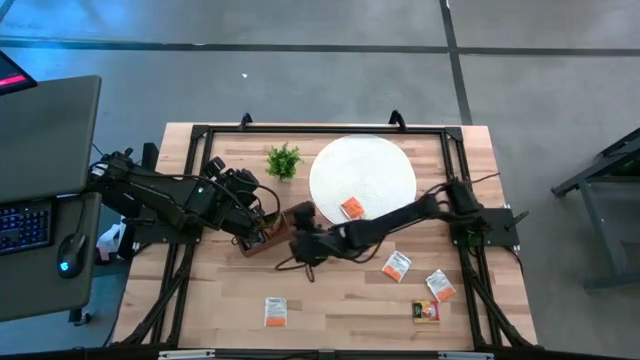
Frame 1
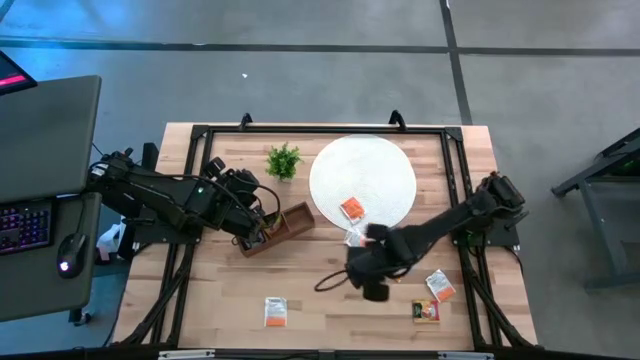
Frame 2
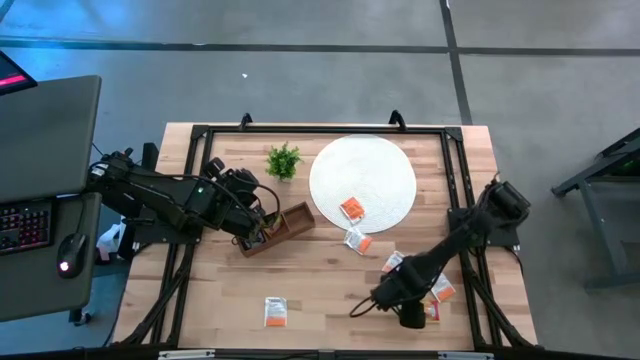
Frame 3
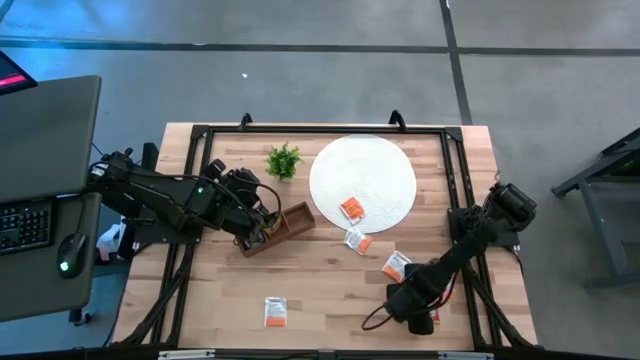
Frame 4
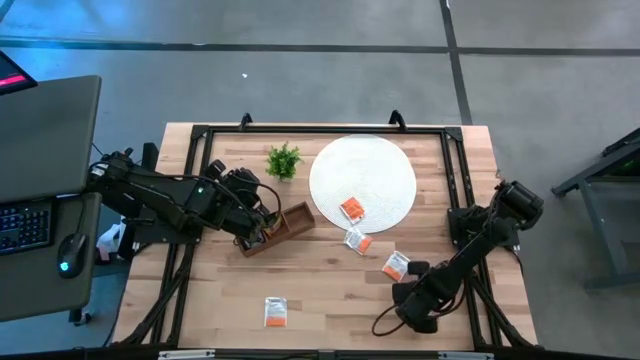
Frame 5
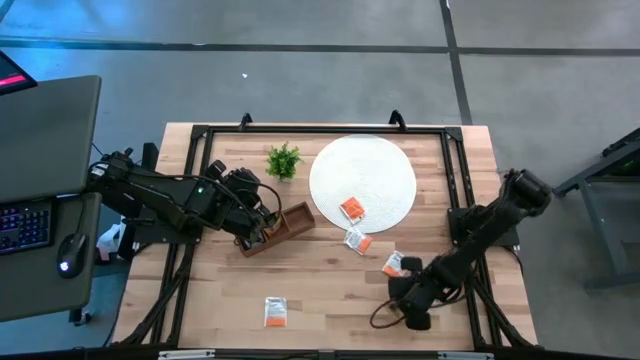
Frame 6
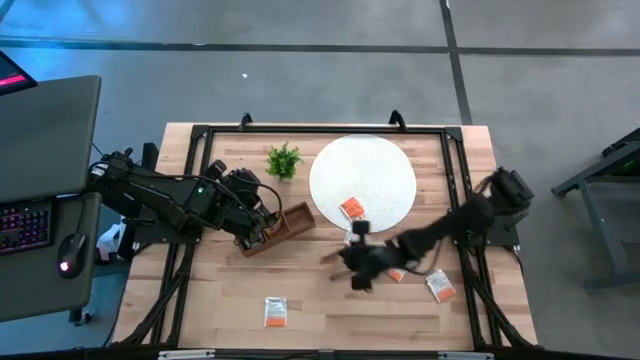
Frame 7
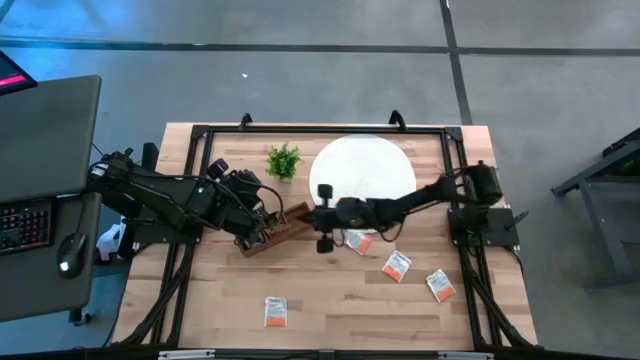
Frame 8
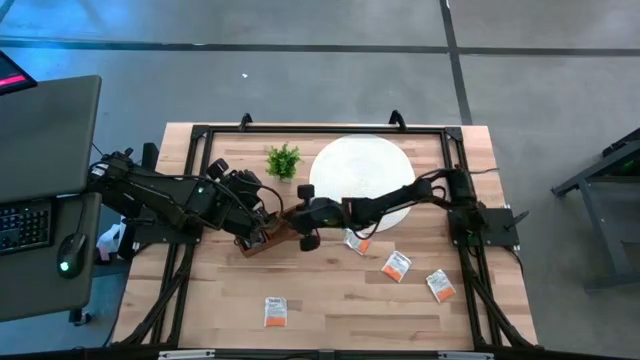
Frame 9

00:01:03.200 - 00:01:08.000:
Task: Pick & Place Tea
Put the yellow tea bag into the middle section of the wooden organizer

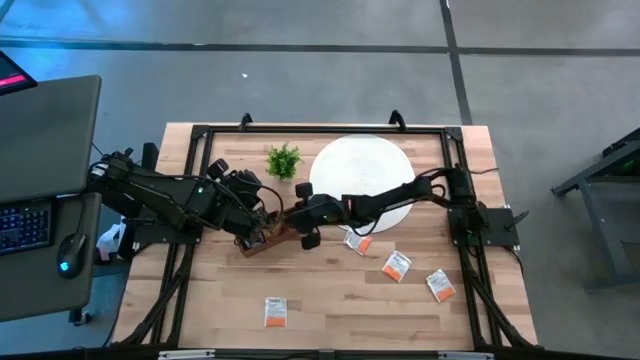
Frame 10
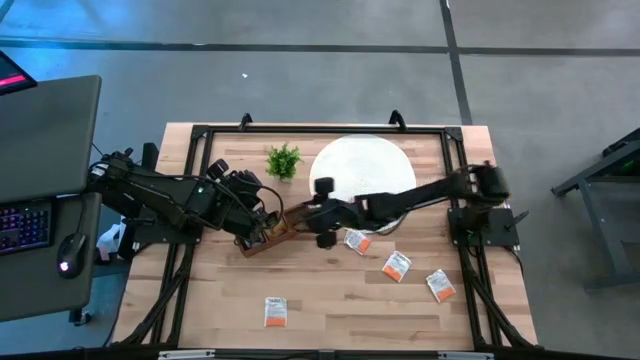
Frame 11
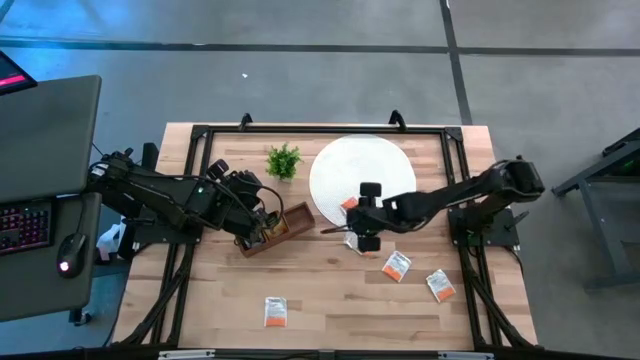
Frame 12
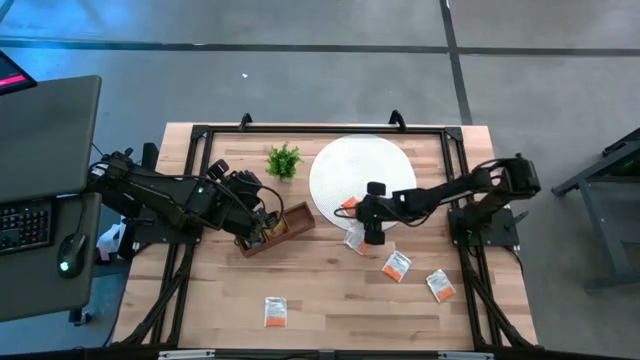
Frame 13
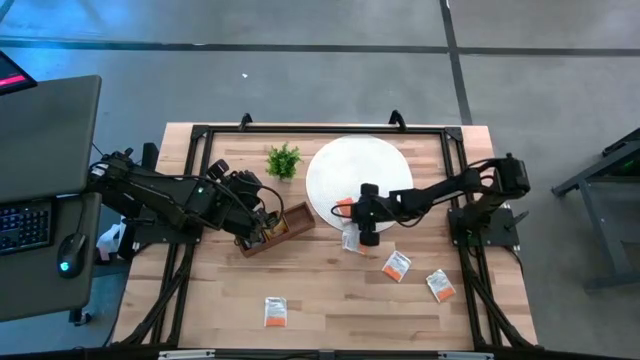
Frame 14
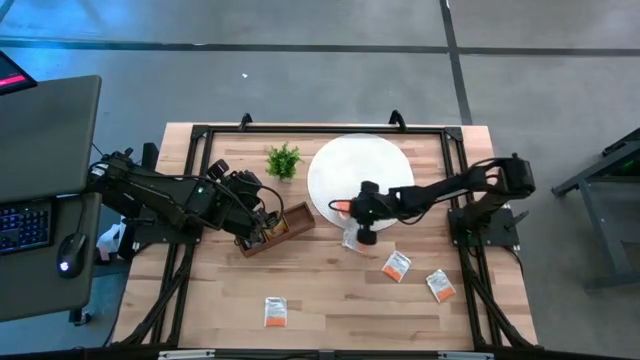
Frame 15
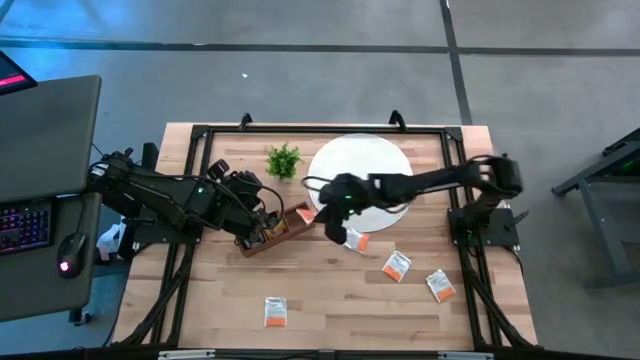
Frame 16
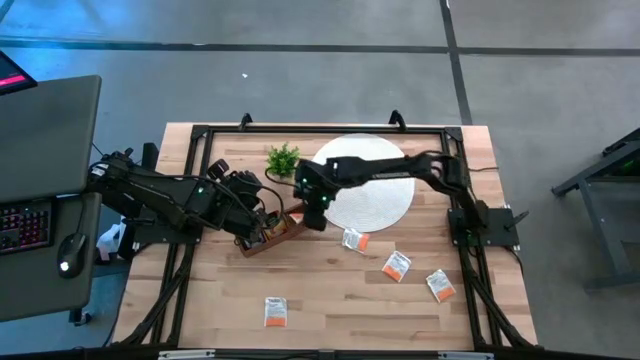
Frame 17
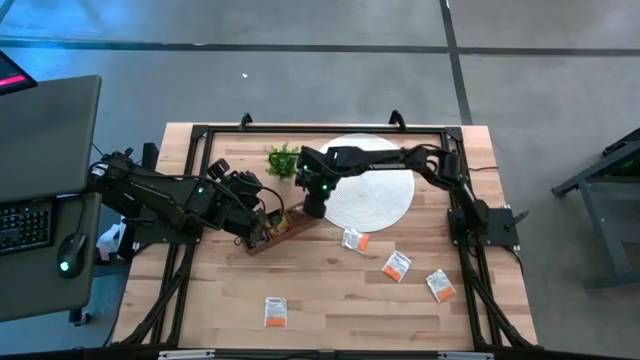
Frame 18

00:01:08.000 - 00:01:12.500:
Put the orange tea bag into the right section of the wooden organizer

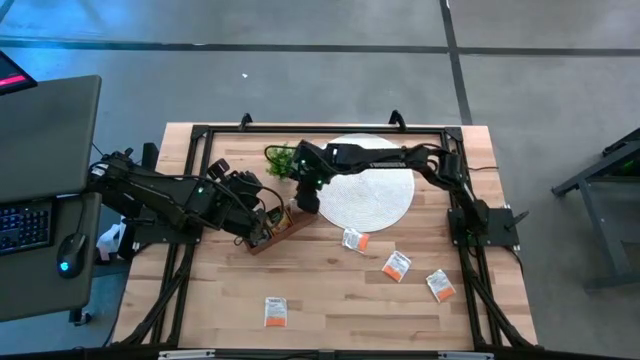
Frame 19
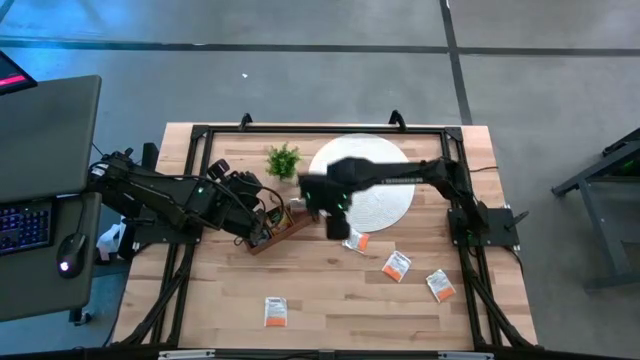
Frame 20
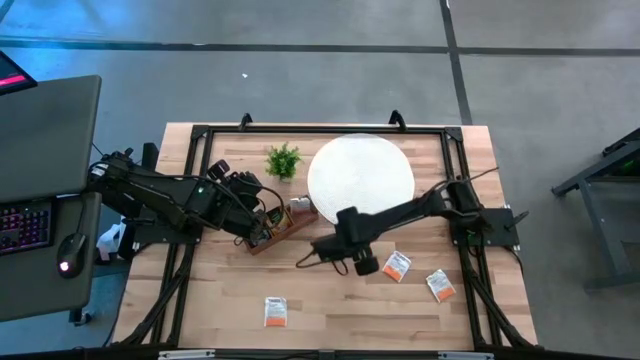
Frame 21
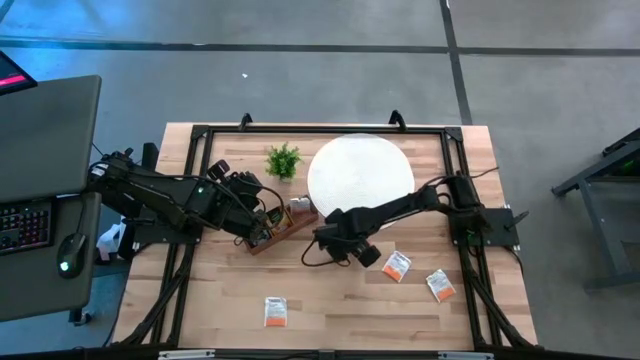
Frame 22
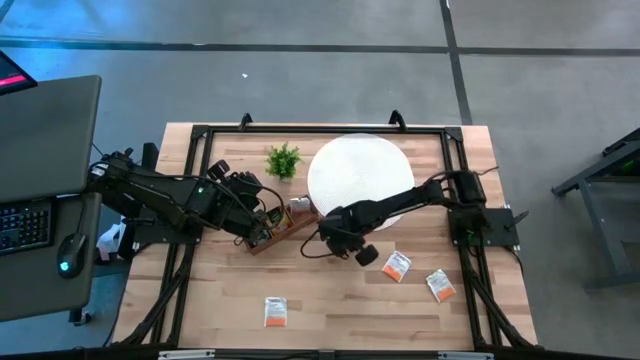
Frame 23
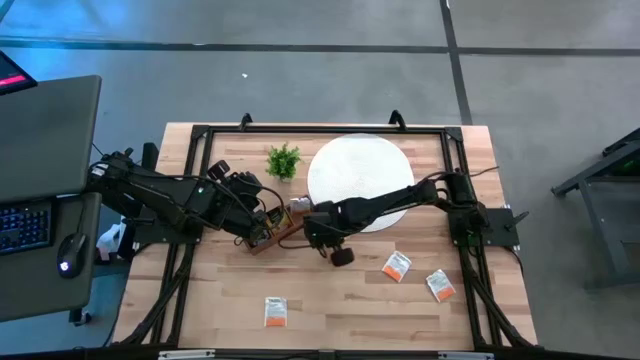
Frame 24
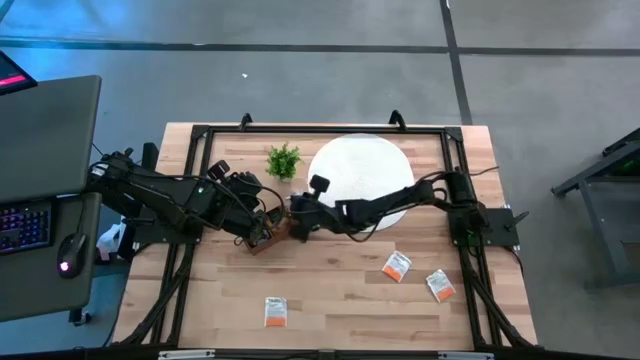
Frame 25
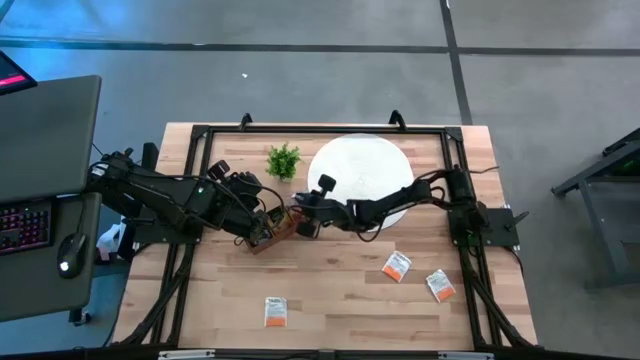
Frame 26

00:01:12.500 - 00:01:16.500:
Put the orange tea bag into the right section of the wooden organizer

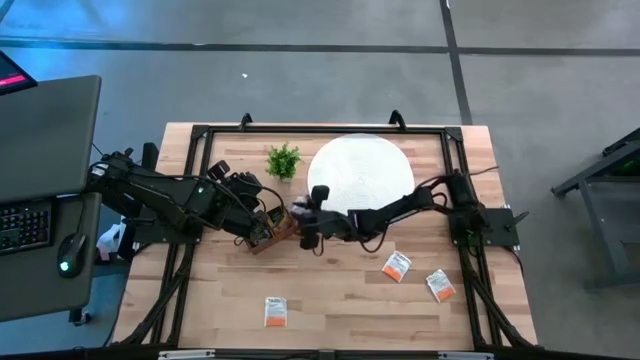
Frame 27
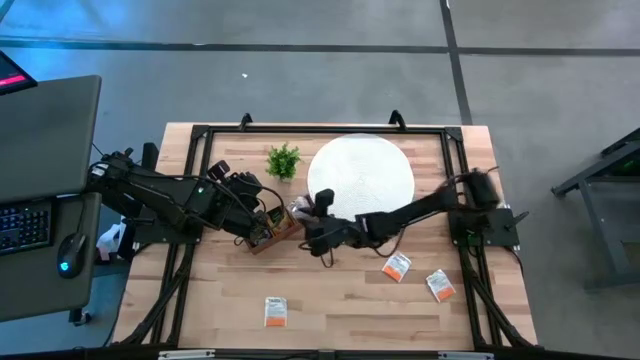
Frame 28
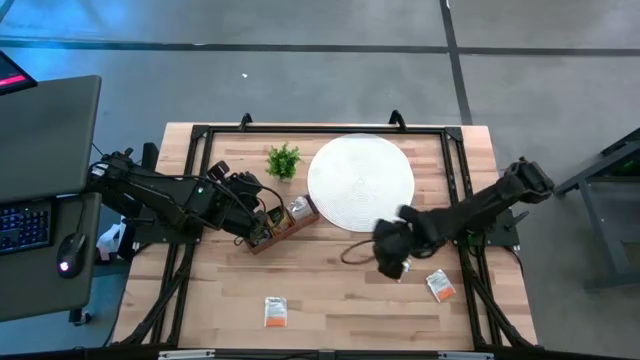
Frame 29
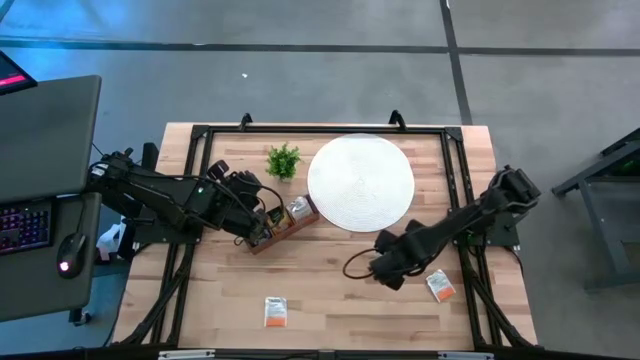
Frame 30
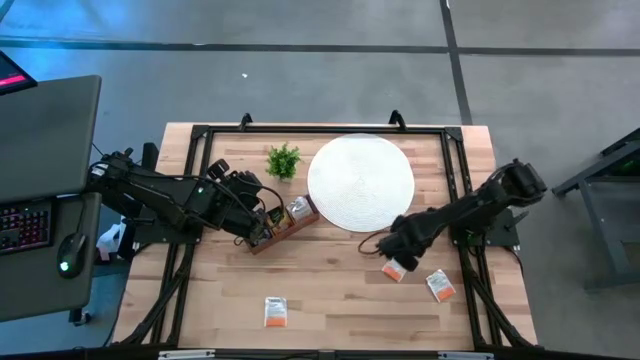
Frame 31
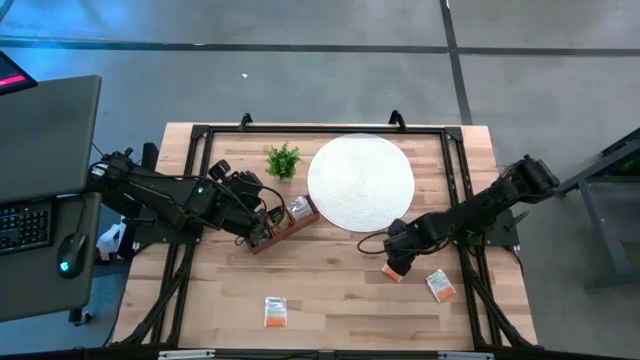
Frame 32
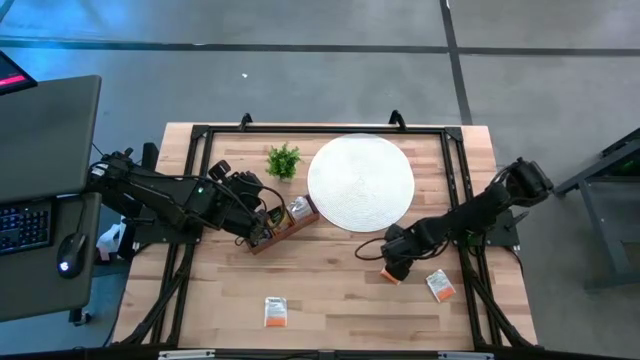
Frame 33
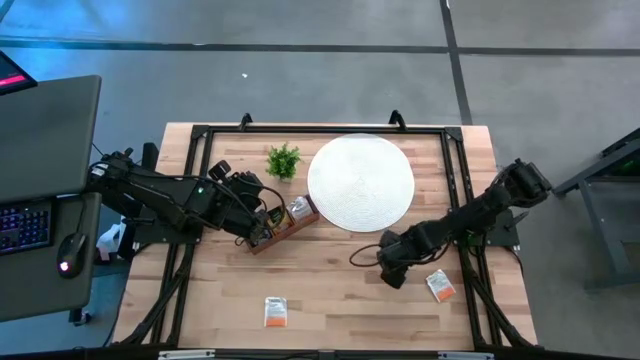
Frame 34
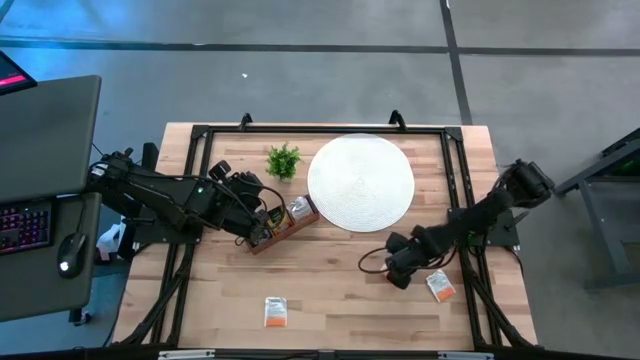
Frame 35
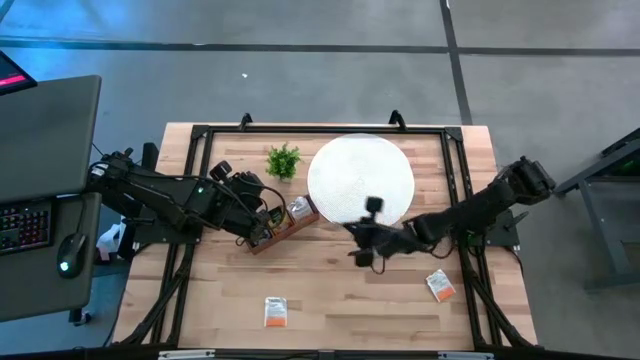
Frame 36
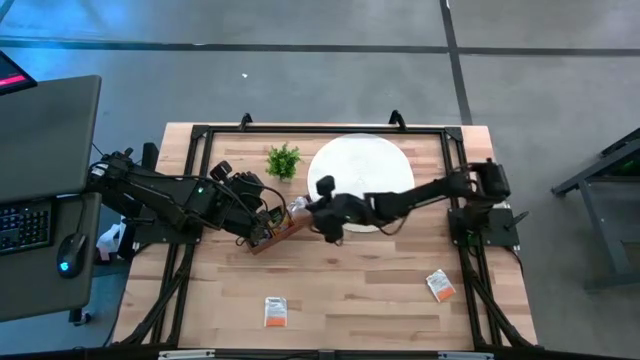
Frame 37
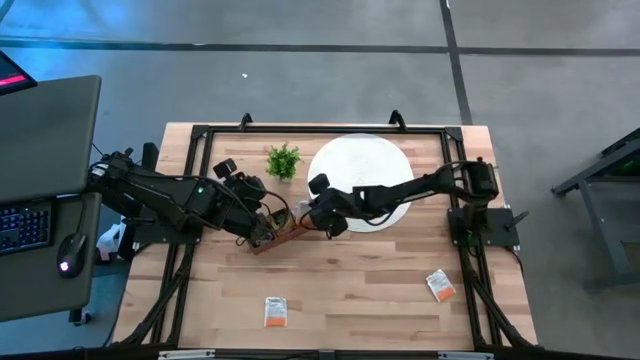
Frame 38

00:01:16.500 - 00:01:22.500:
Put the orange tea bag into the right section of the wooden organizer

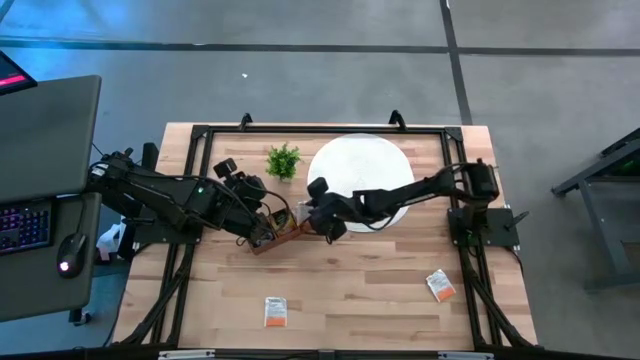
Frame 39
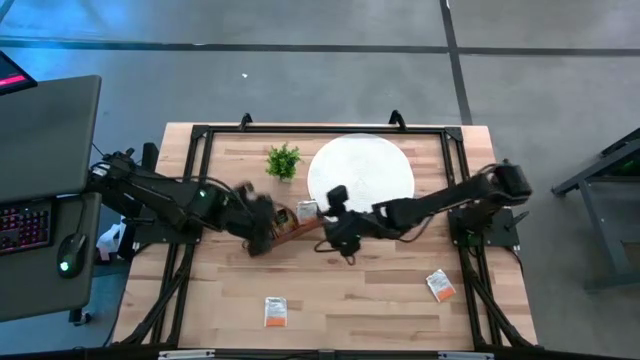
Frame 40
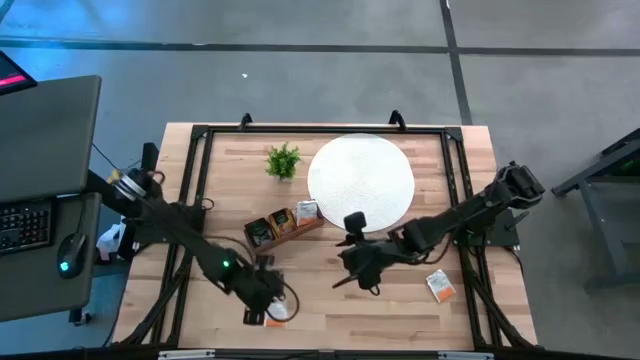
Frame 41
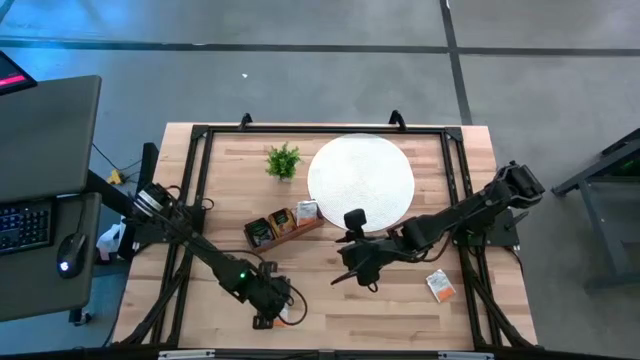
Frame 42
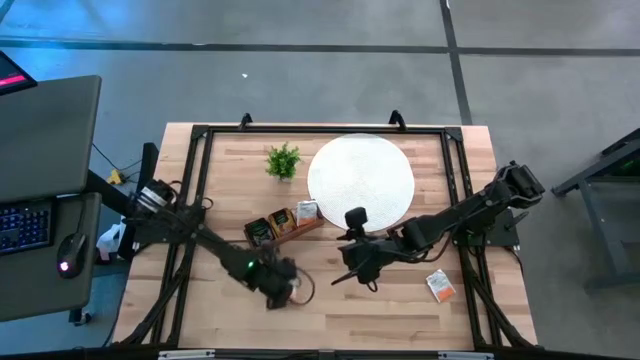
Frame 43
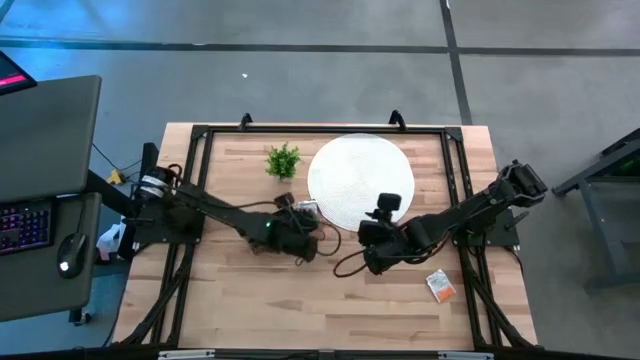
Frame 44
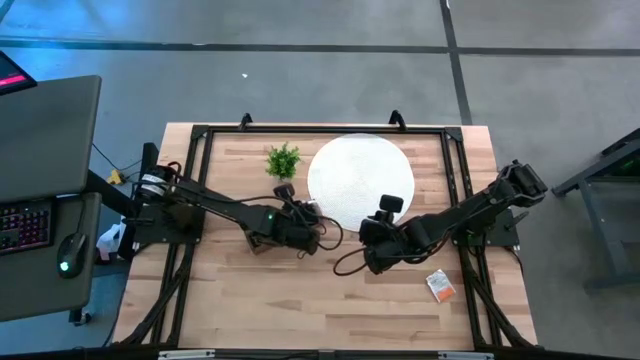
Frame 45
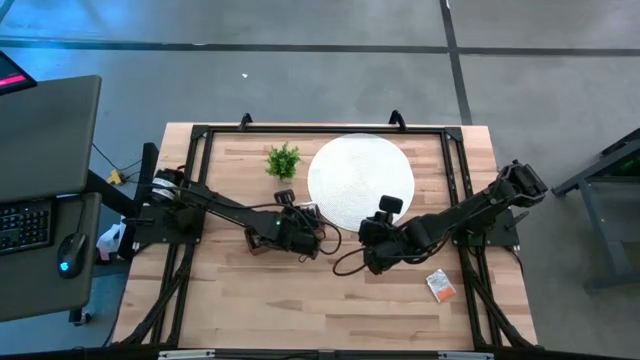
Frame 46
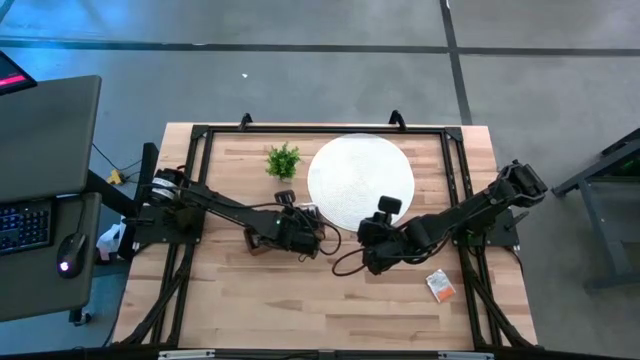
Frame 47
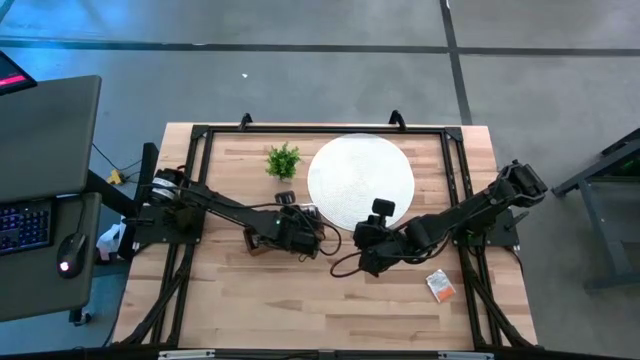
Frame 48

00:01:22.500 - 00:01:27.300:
Put the orange tea bag into the right section of the wooden organizer
